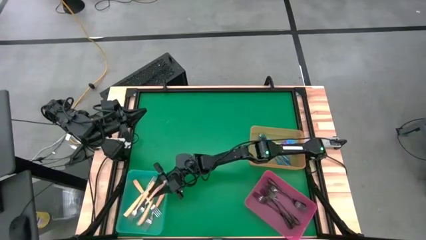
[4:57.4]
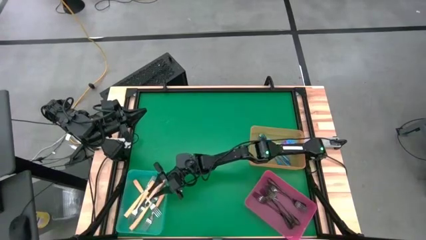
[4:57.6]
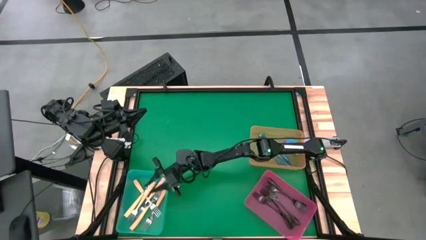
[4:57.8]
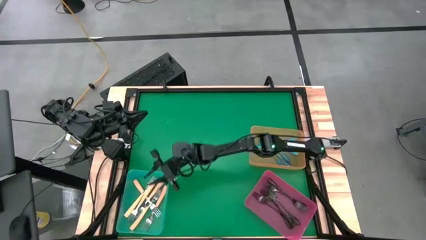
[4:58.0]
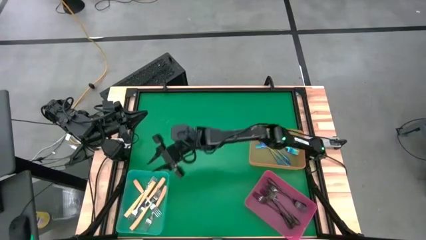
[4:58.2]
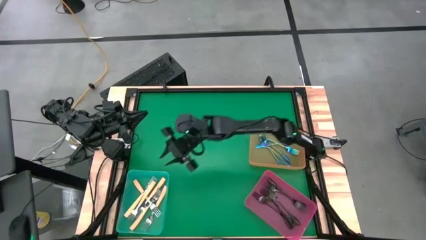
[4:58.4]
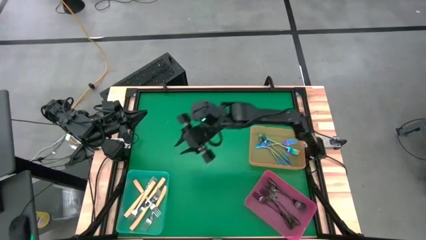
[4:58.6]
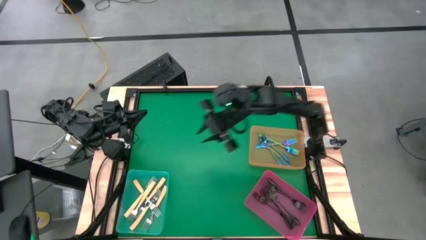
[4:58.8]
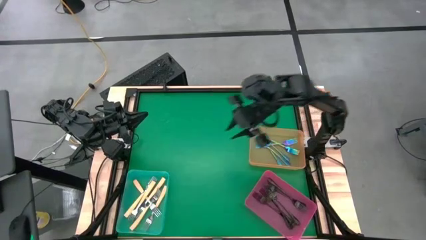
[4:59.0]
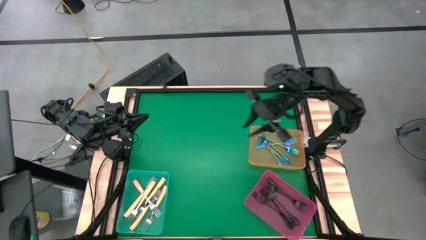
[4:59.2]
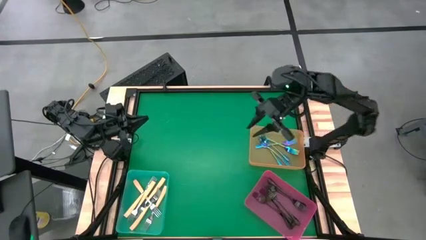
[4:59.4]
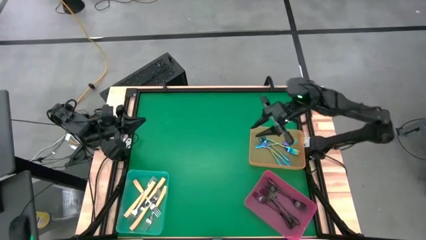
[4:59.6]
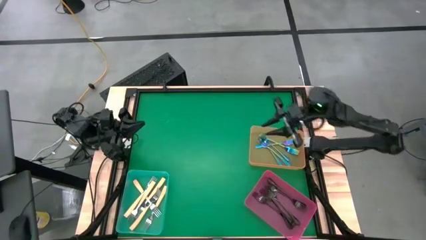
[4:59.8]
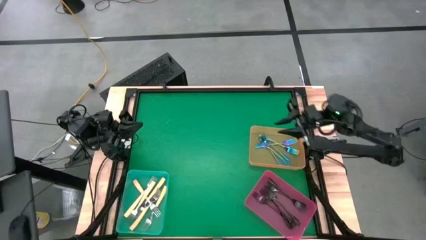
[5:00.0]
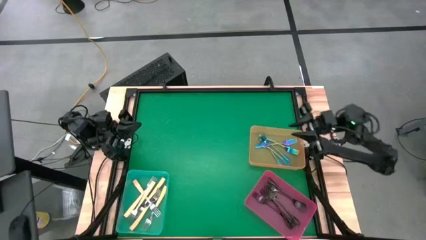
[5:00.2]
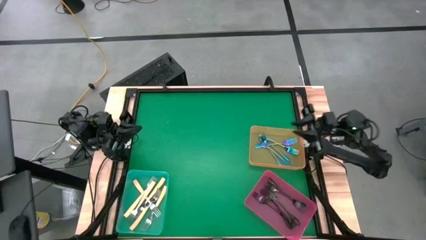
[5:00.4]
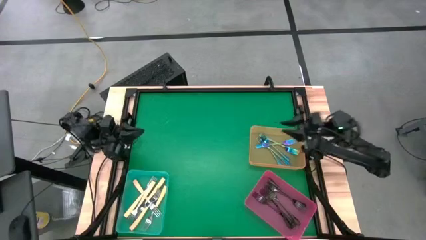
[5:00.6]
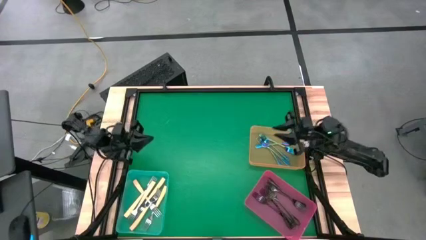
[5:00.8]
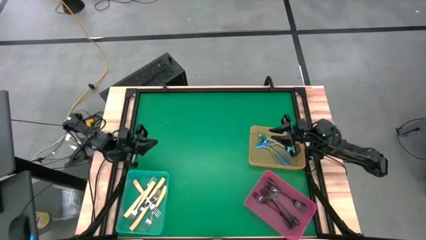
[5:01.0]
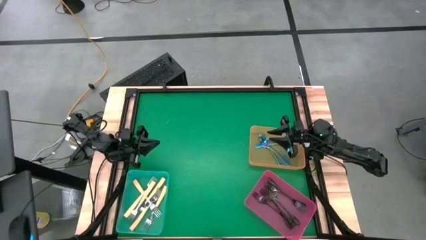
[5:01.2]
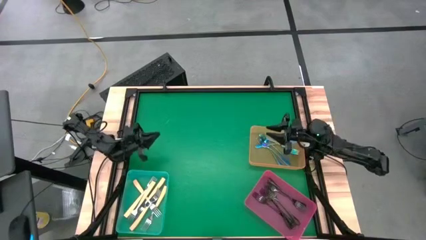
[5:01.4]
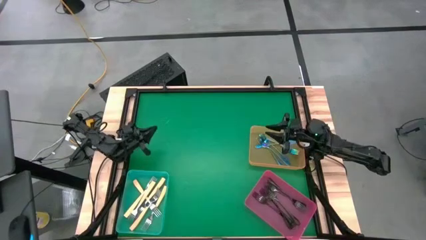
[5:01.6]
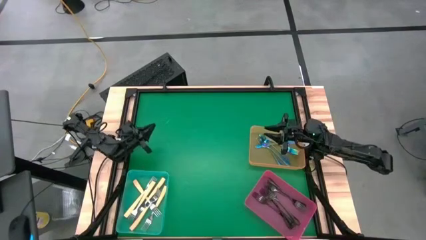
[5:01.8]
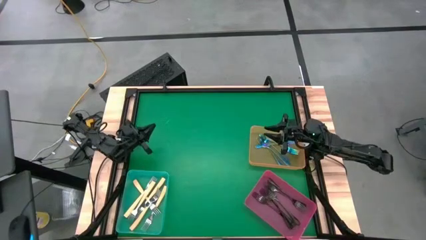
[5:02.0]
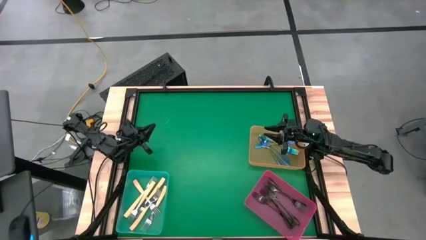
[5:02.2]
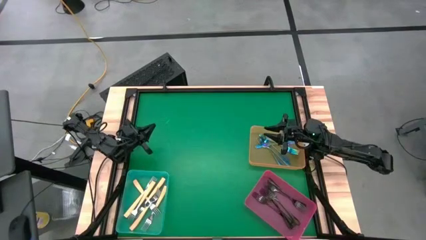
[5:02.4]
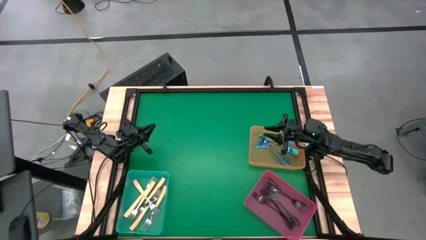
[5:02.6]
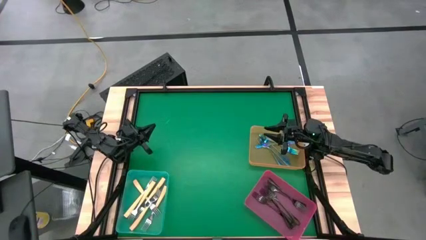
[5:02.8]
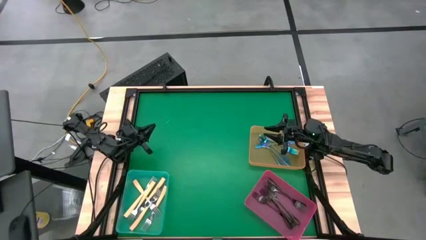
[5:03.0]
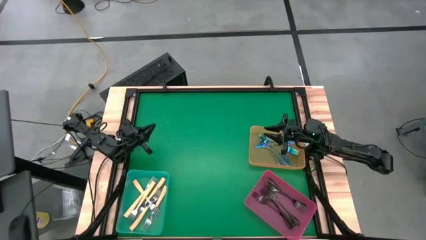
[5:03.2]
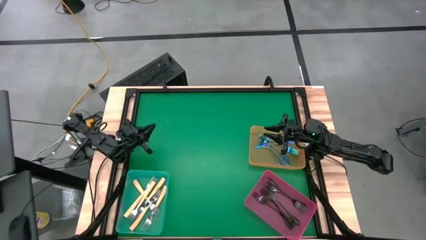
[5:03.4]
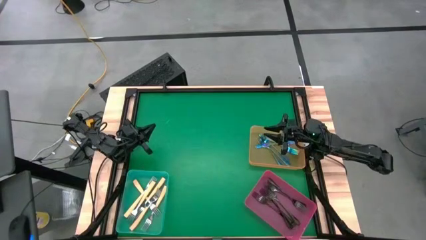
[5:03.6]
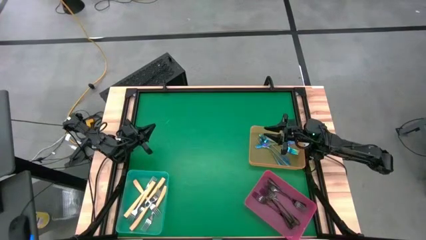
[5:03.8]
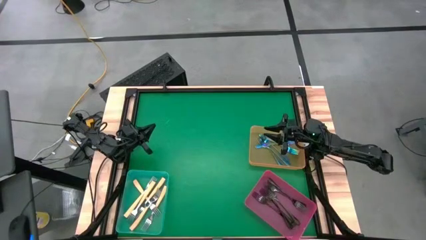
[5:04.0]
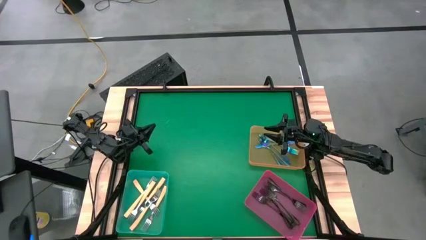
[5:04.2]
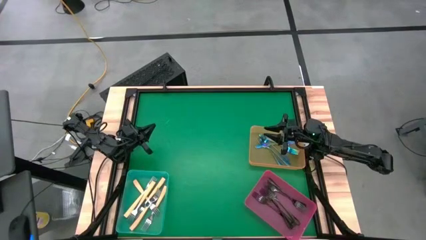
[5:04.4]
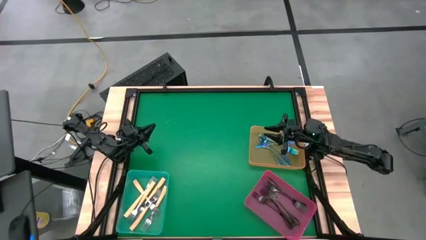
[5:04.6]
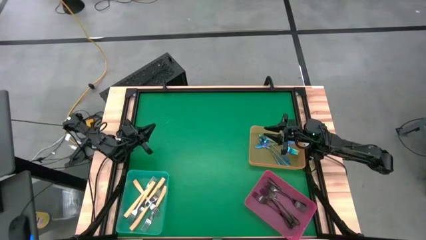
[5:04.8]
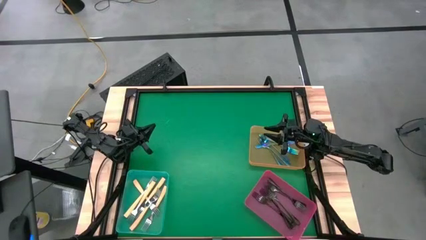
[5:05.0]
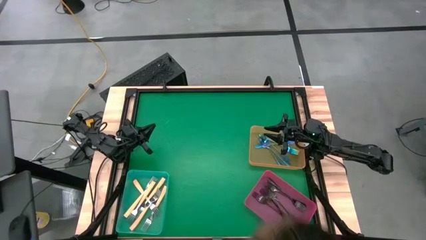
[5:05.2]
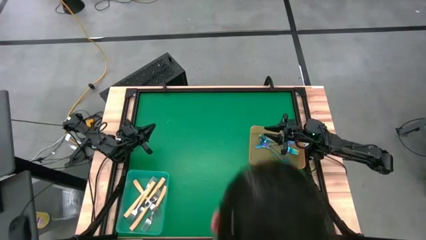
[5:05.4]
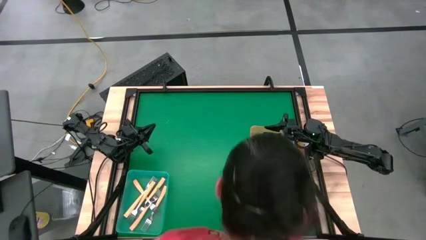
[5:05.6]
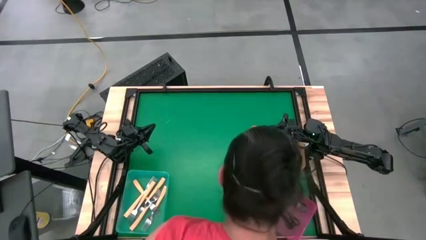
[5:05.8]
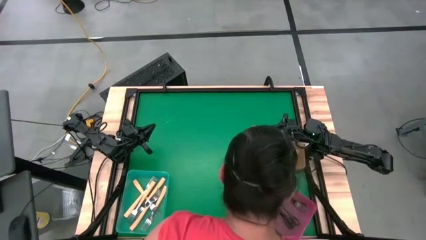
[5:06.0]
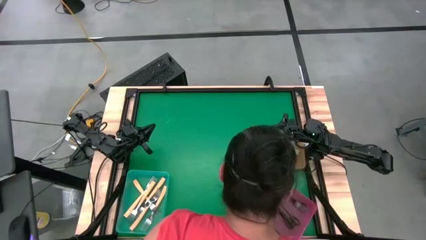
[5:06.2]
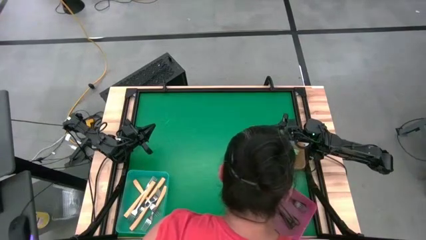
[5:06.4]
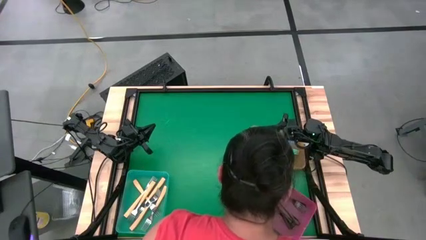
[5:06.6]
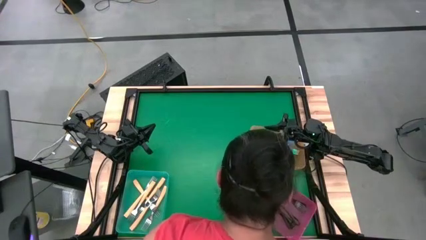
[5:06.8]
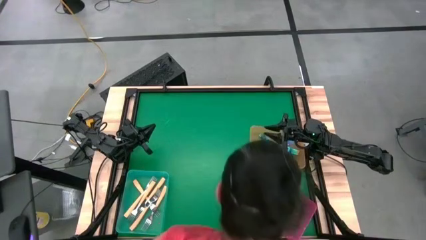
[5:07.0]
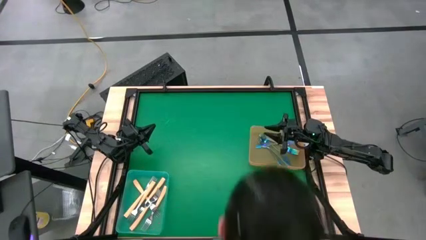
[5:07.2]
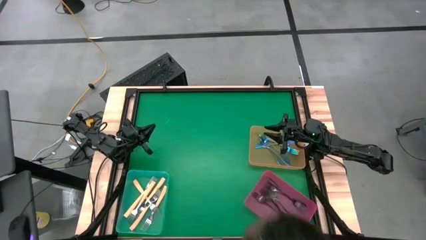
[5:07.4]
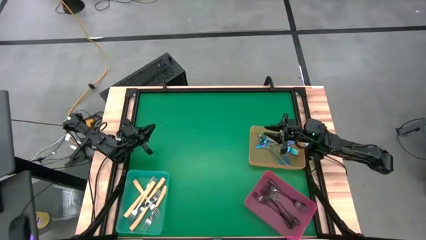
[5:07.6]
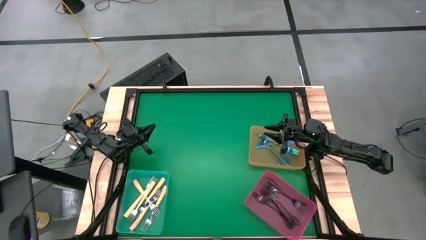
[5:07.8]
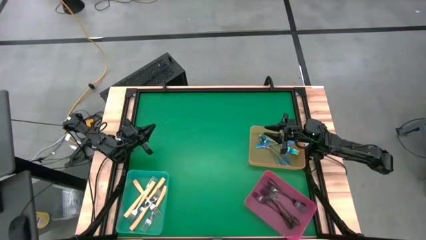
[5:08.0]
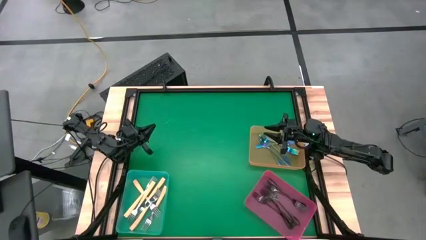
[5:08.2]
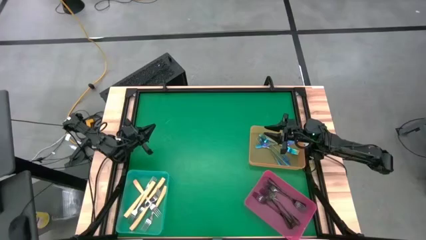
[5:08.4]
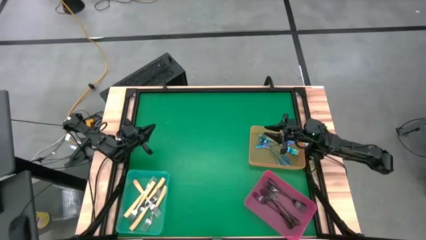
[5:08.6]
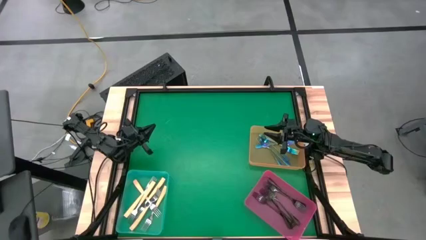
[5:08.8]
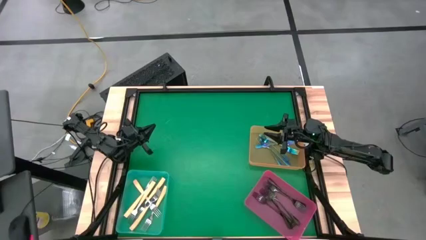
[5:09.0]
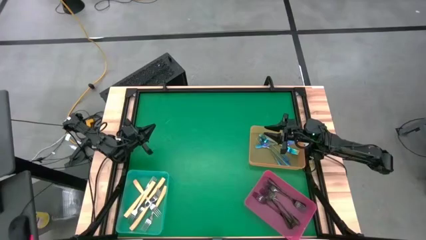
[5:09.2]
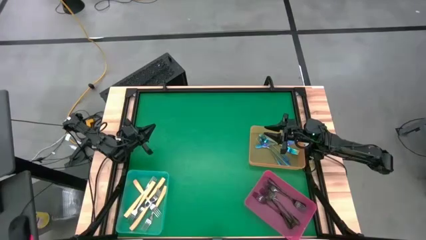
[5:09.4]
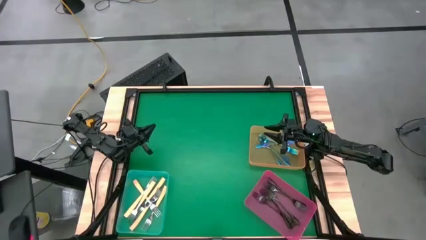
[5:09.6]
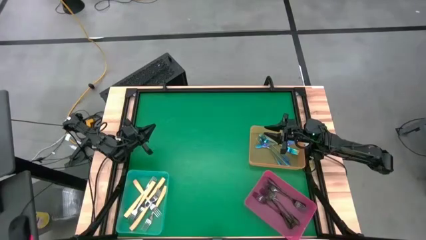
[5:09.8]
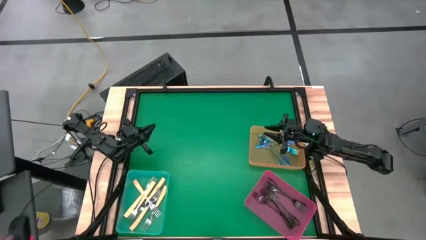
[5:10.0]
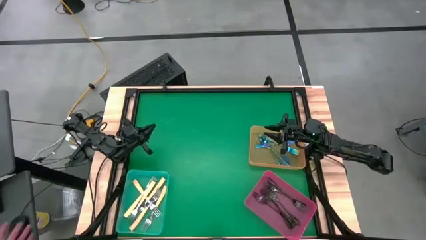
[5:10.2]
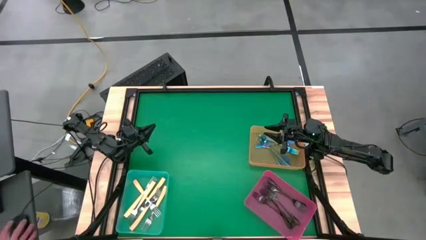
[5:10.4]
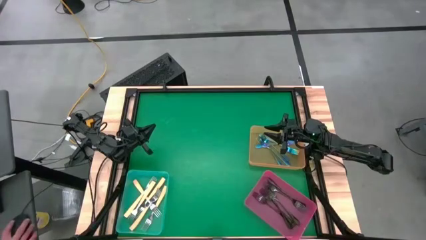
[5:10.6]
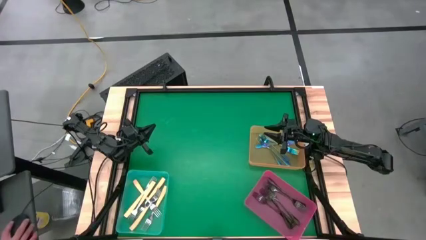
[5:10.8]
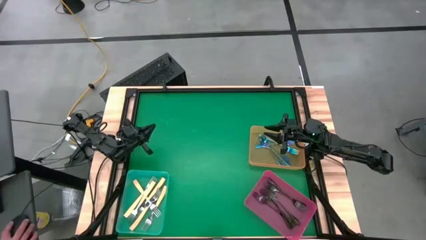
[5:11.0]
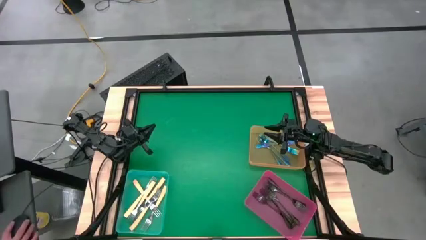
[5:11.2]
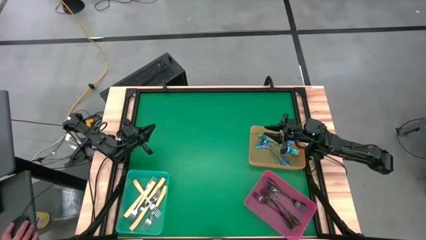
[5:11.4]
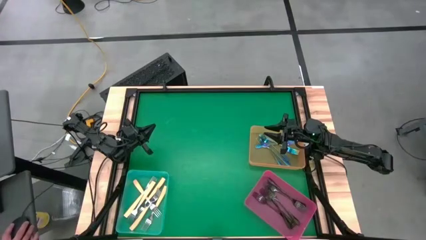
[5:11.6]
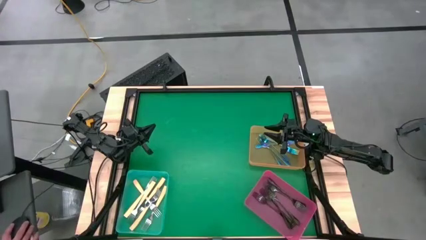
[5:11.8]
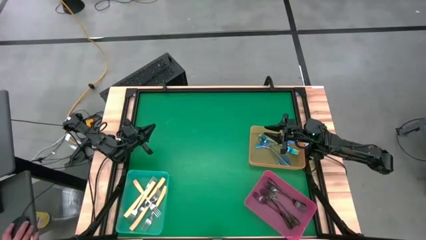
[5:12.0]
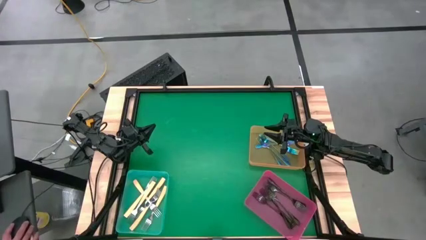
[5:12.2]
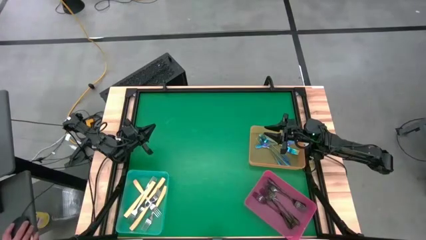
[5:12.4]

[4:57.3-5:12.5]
Task: Sort silverware by color (type)
Return to Home Position

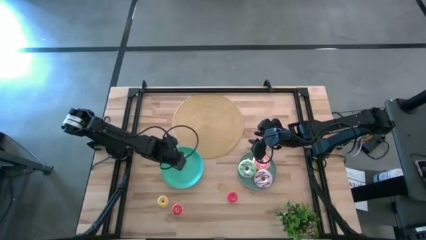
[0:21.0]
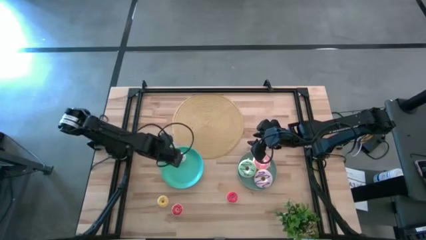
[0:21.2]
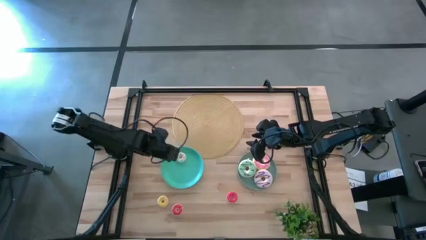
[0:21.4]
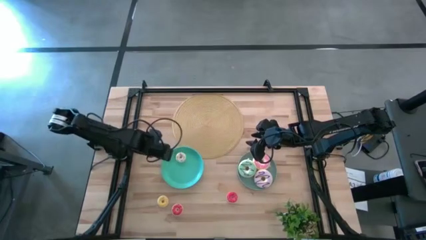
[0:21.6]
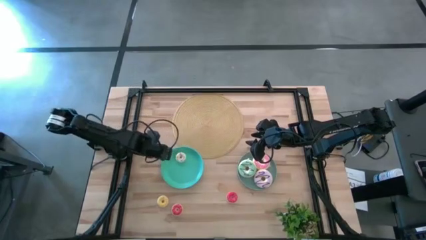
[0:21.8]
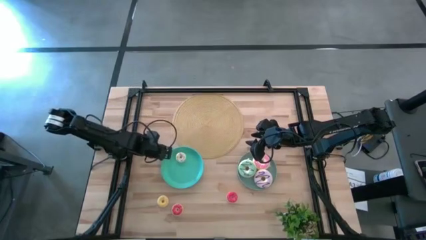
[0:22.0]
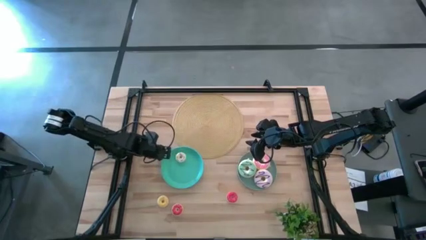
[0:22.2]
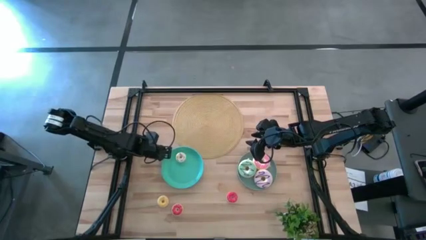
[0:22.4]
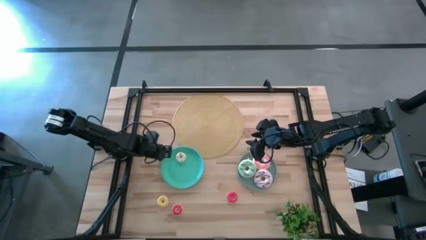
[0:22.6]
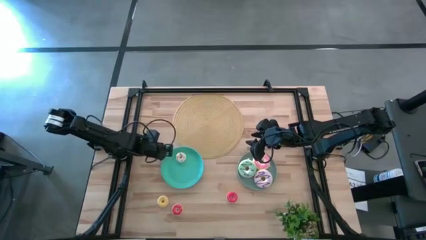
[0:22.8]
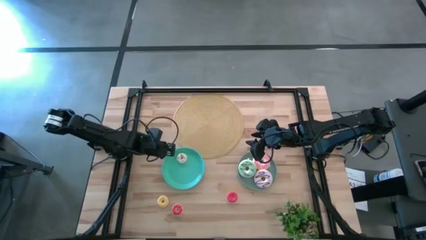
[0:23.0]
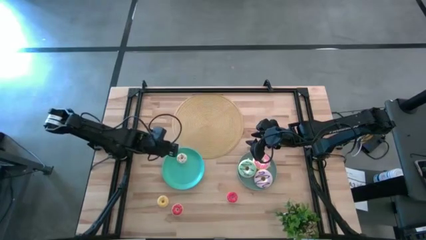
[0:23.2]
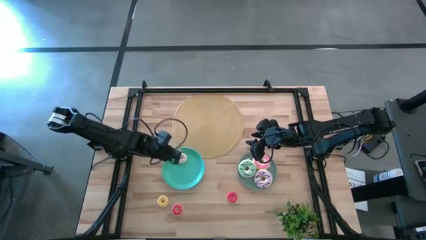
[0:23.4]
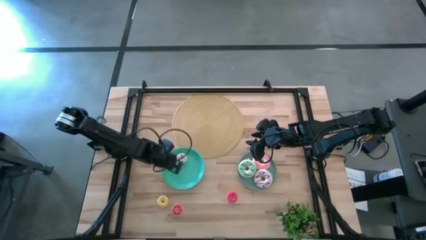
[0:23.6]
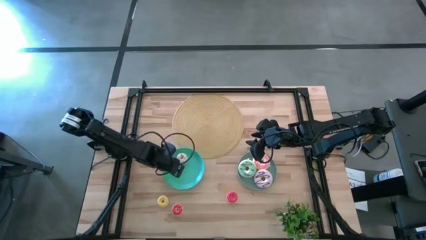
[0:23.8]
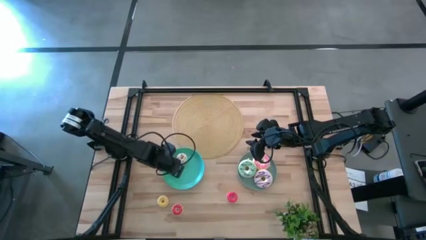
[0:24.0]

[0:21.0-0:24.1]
Task: Pick & Place donuts
Put the small blue donut on the light green plate
